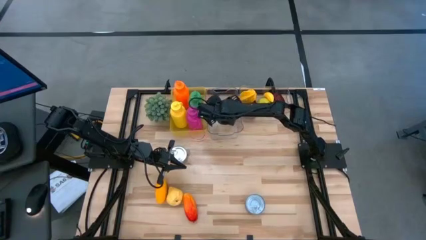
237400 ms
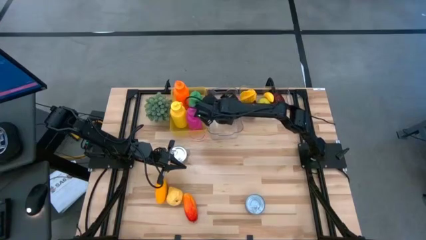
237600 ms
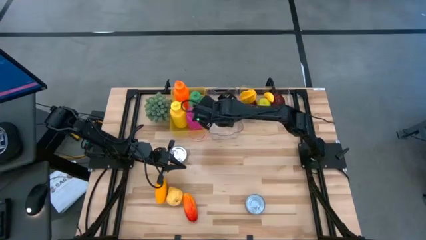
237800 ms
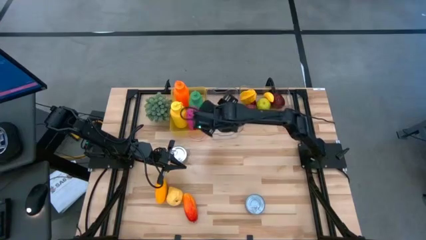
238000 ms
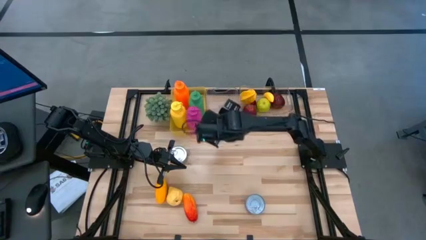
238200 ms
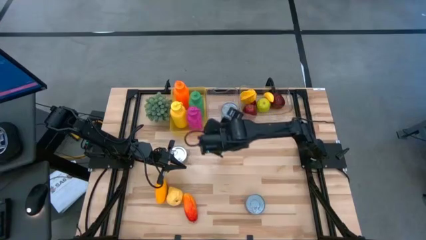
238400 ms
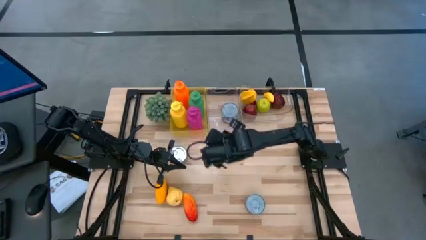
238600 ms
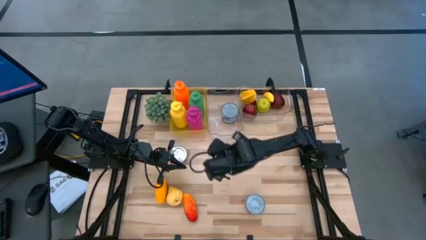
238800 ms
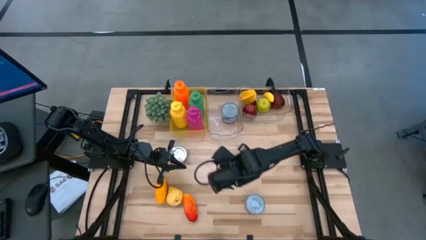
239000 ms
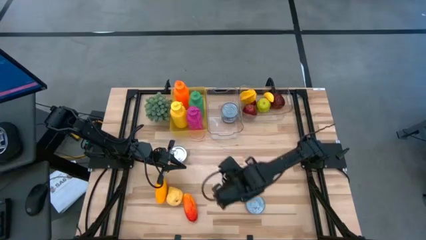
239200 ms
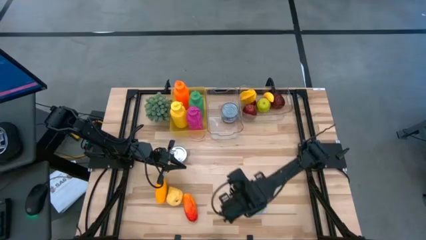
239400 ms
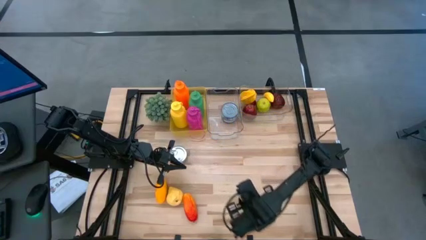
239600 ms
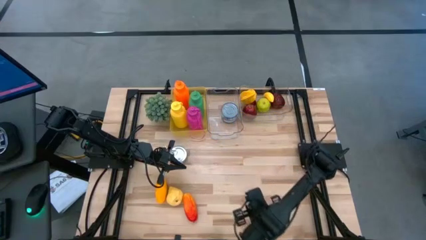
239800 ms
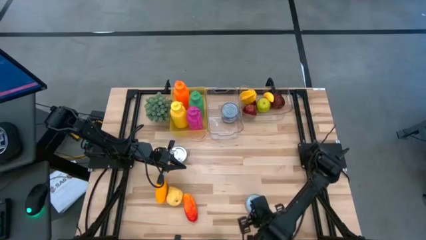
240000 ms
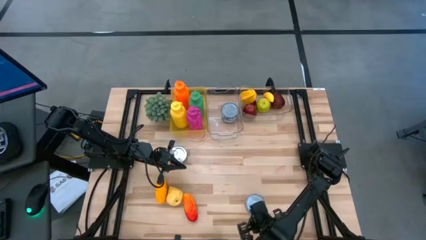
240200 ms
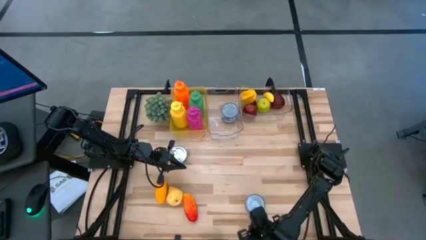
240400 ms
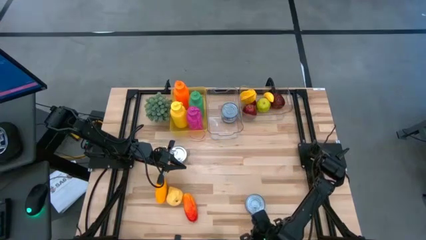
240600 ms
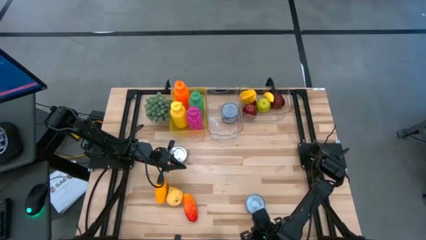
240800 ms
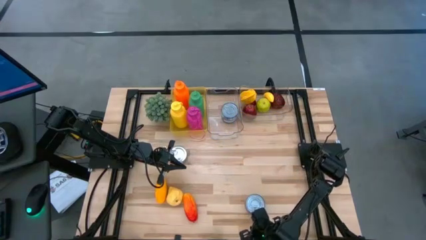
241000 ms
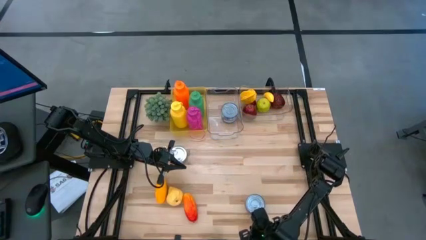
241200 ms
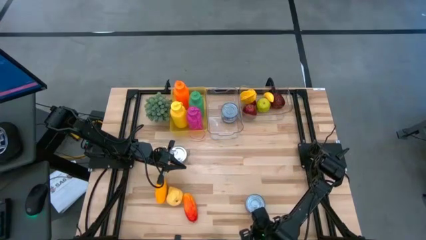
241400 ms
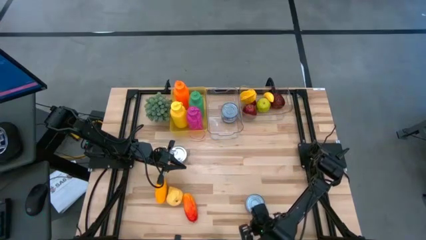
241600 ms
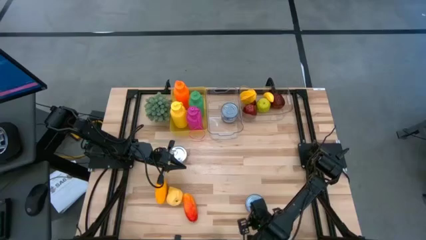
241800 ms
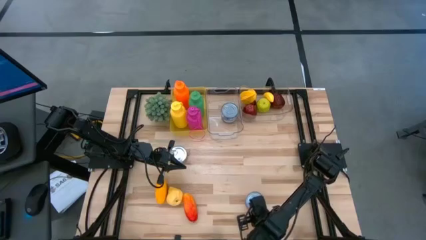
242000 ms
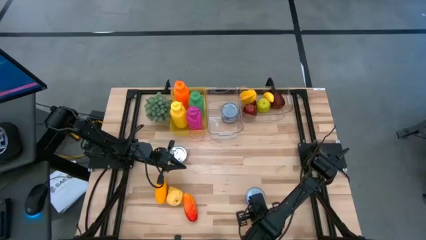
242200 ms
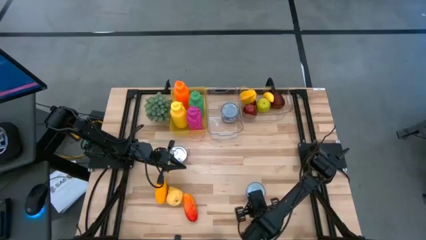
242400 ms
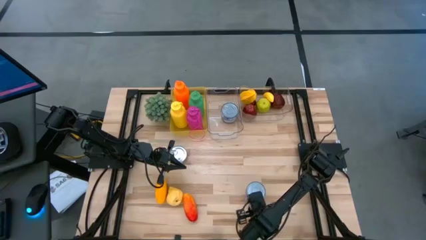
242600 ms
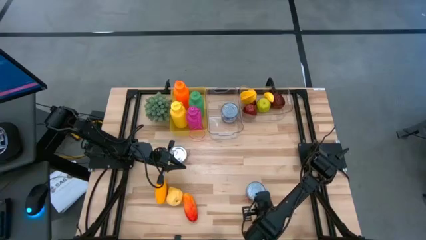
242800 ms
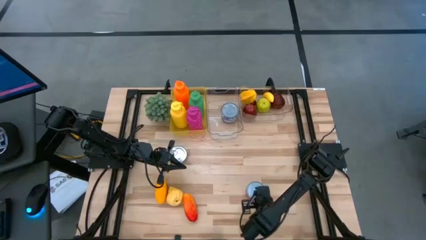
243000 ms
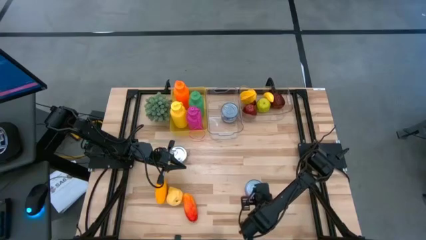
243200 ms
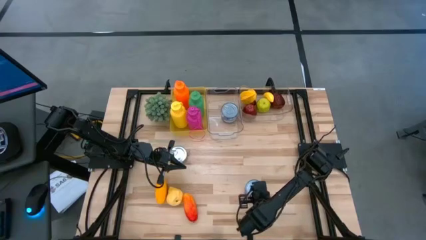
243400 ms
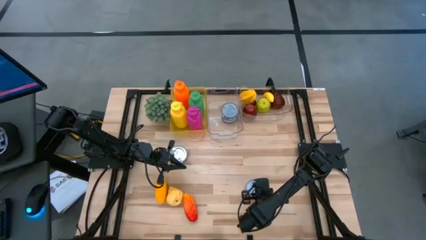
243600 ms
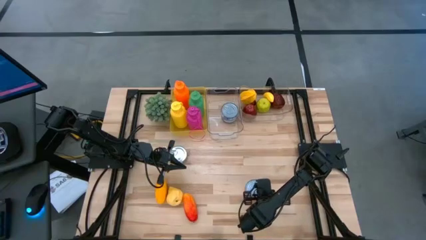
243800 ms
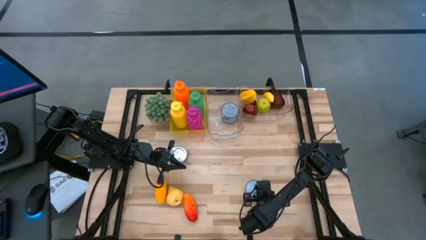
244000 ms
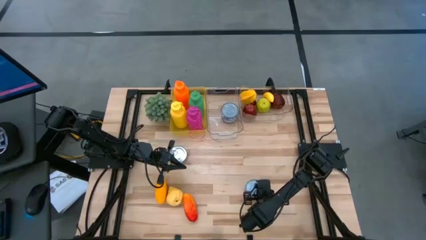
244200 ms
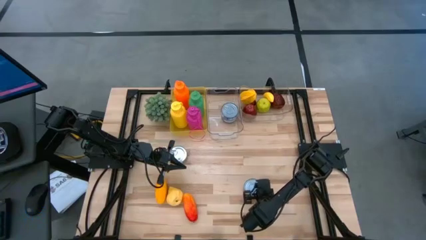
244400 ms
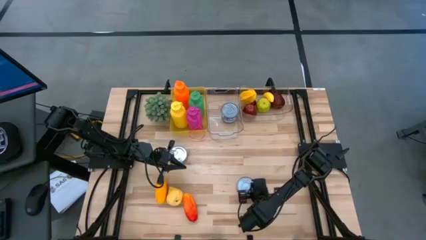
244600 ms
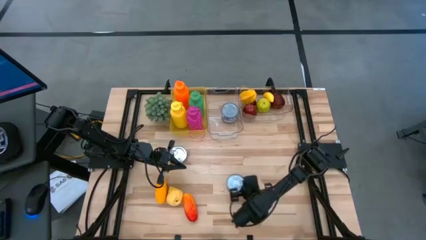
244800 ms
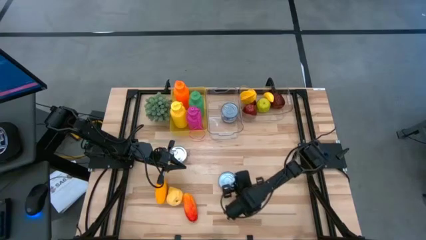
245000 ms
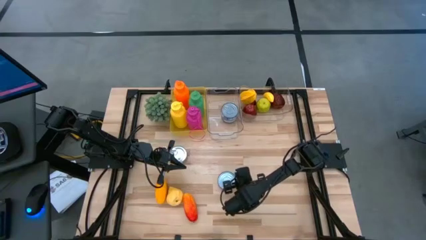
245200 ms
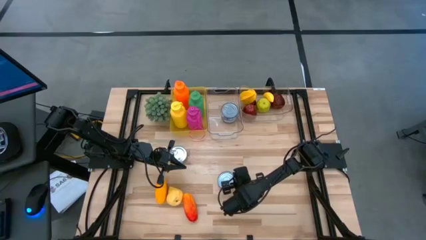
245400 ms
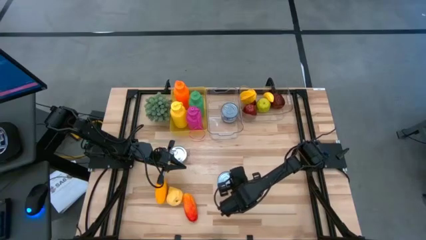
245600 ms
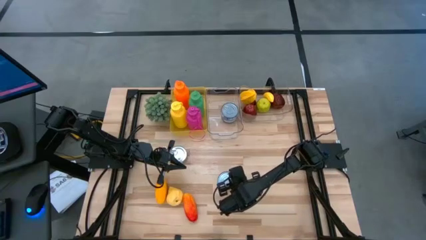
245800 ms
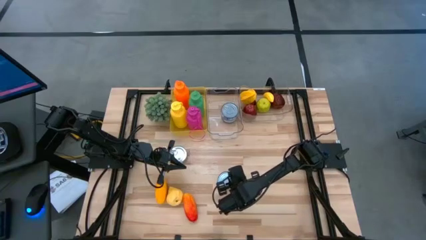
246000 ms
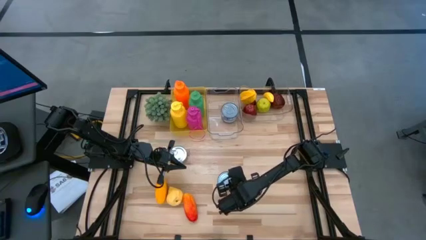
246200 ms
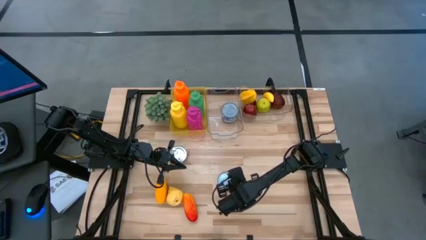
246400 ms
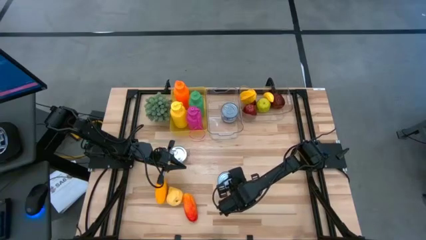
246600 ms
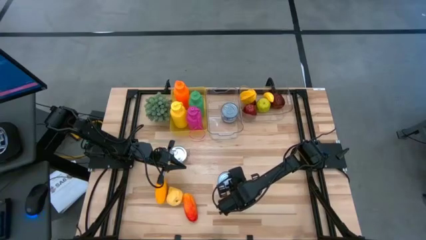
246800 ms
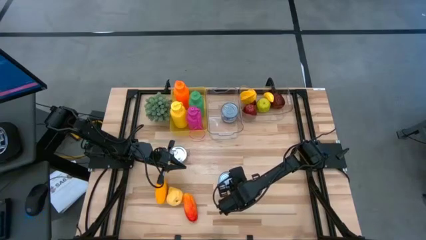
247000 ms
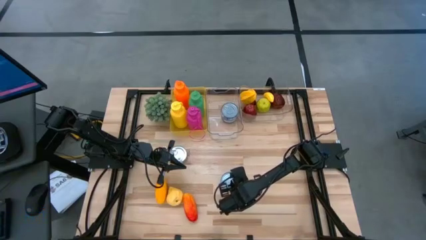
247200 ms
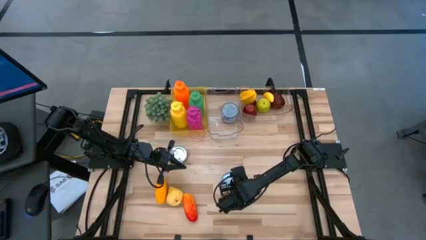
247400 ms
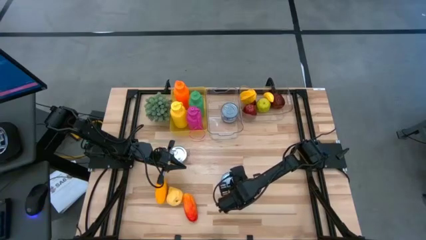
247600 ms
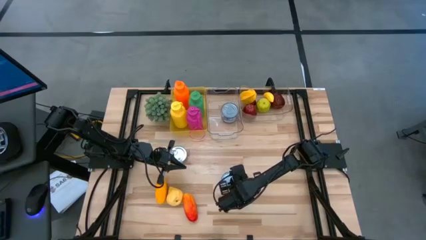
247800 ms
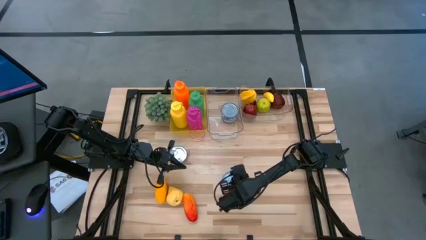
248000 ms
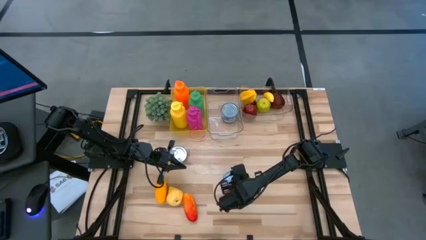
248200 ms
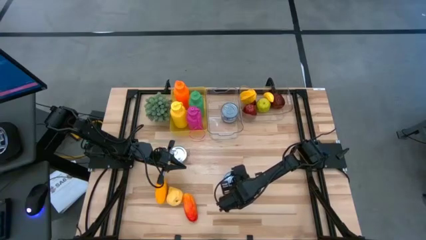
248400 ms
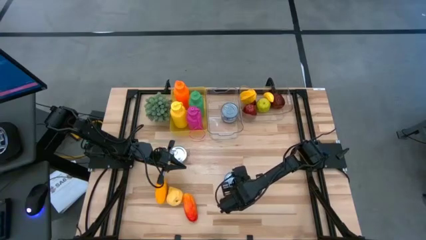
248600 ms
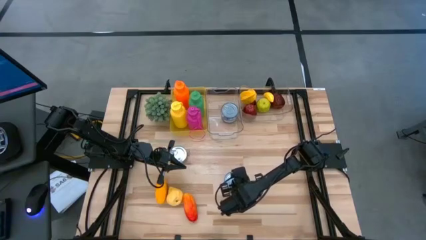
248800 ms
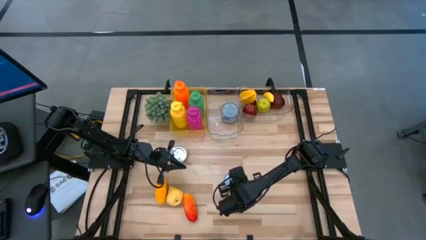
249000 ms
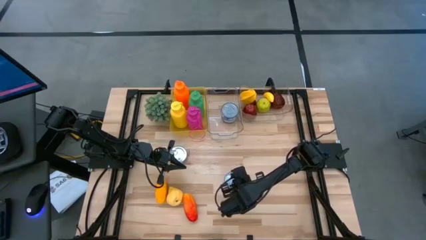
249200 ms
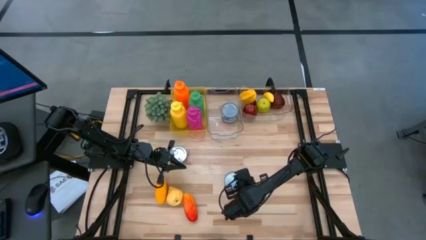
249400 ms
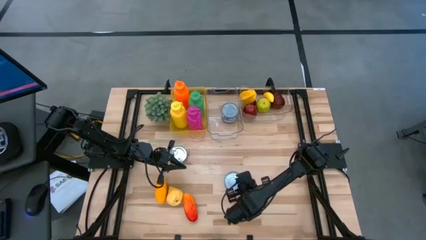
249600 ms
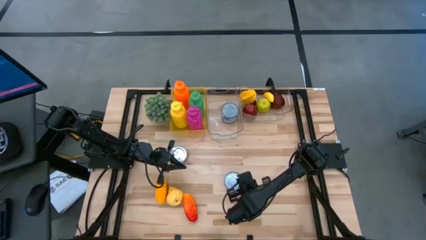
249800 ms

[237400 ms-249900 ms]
Task: Pick & Place Food Item
Put the red tuna into the left transparent bin
